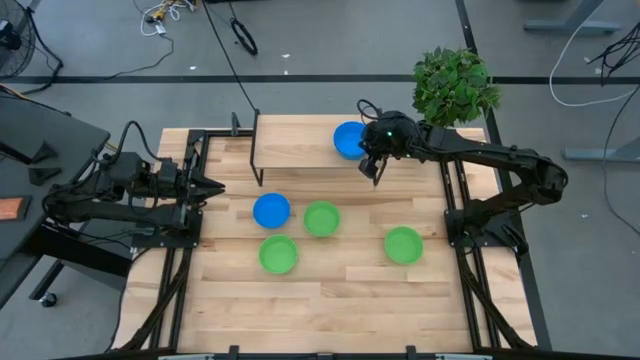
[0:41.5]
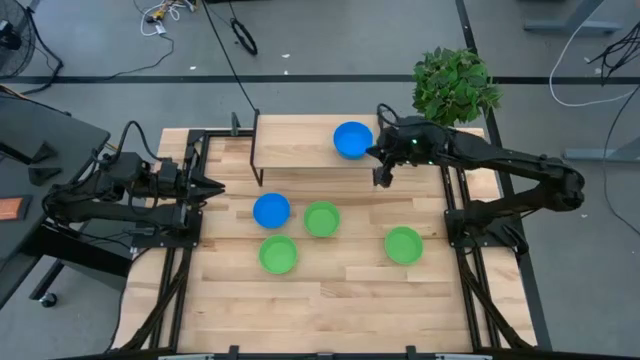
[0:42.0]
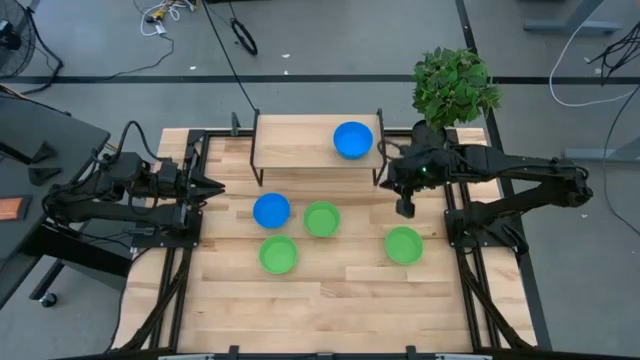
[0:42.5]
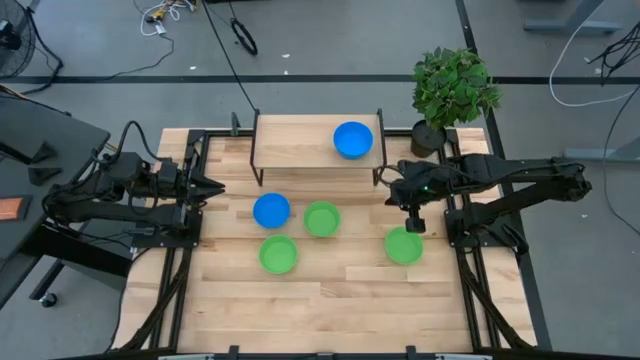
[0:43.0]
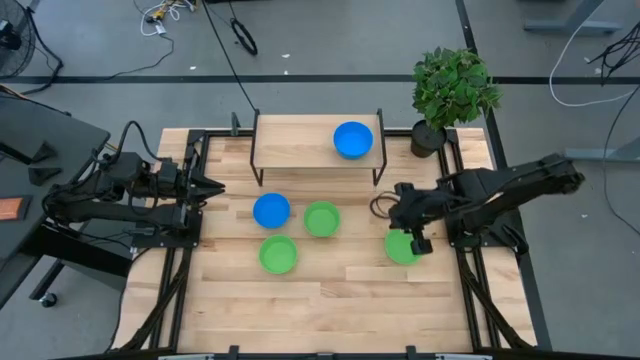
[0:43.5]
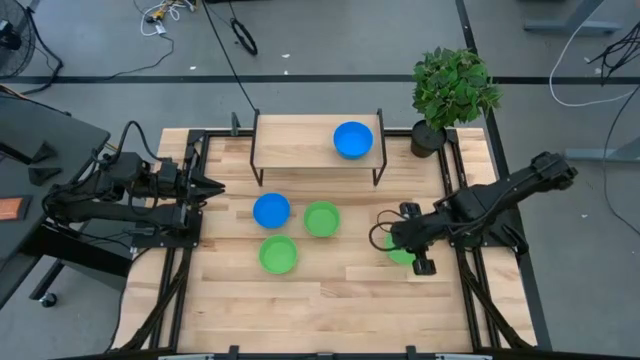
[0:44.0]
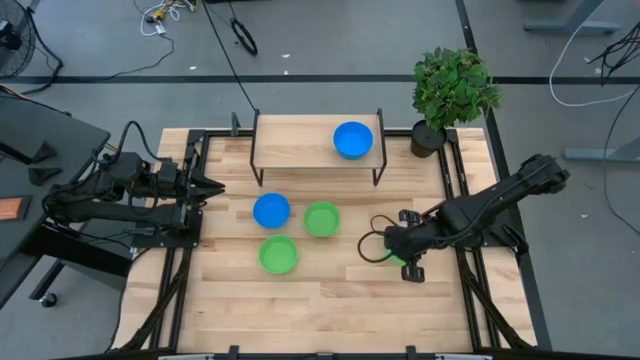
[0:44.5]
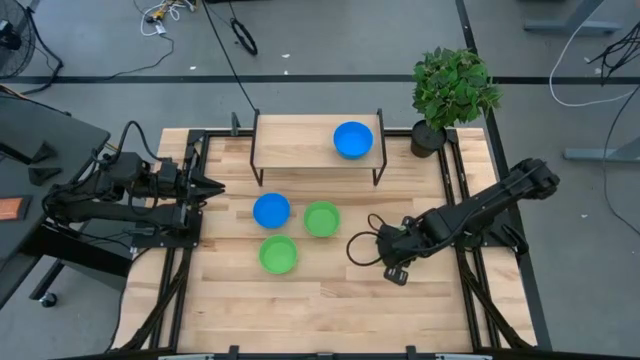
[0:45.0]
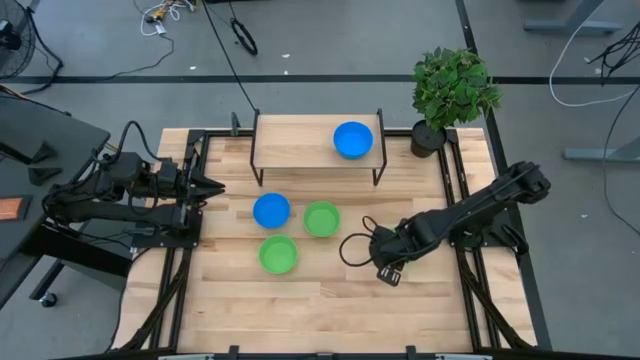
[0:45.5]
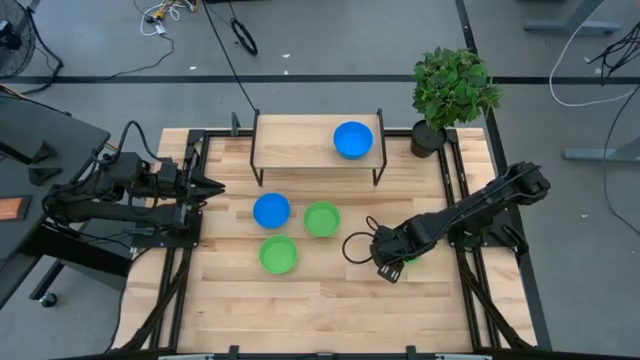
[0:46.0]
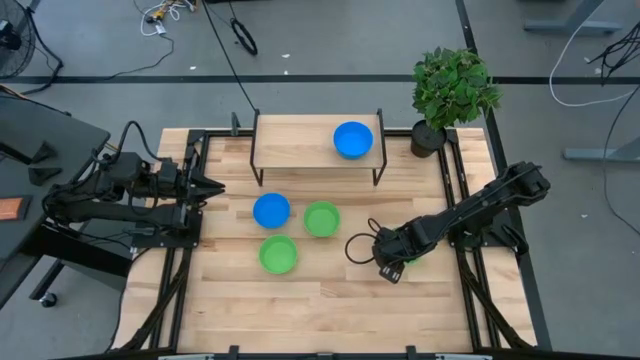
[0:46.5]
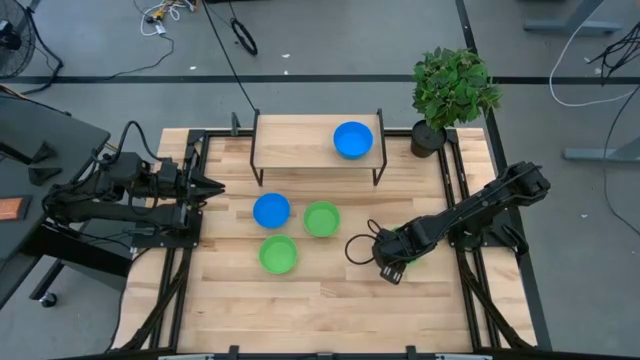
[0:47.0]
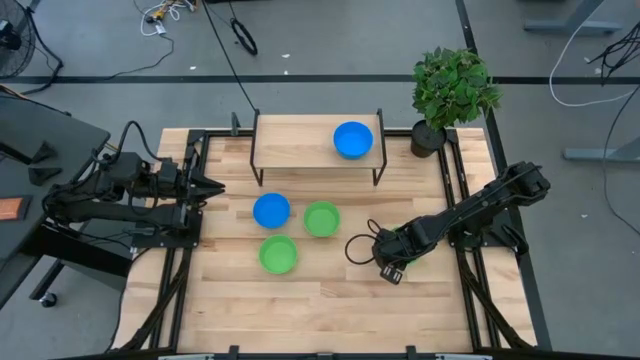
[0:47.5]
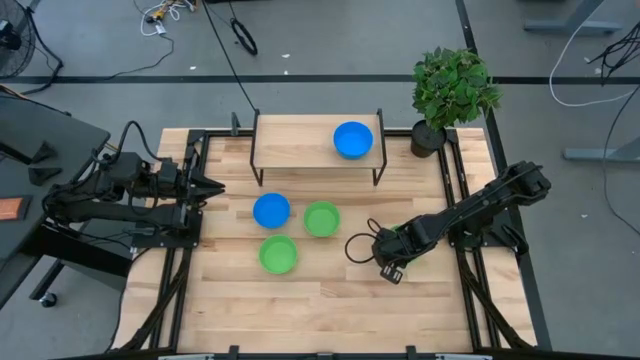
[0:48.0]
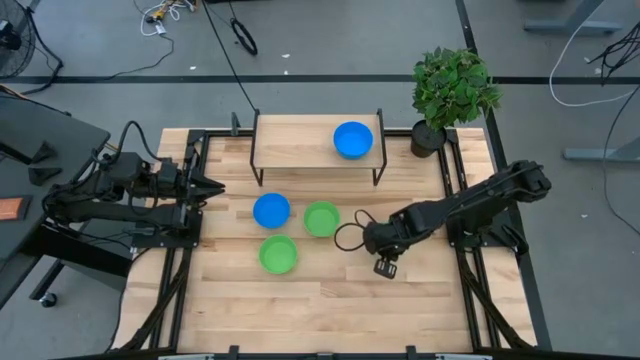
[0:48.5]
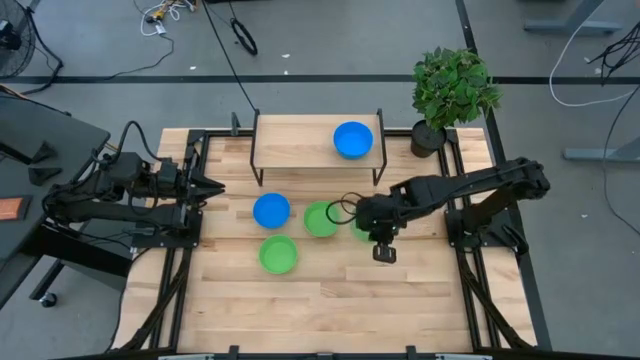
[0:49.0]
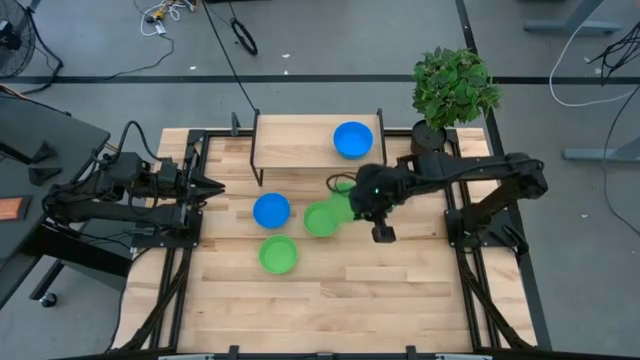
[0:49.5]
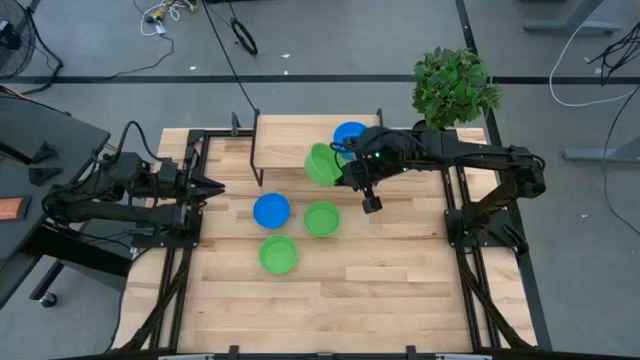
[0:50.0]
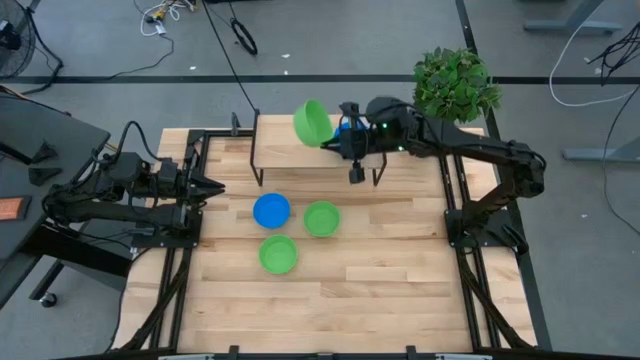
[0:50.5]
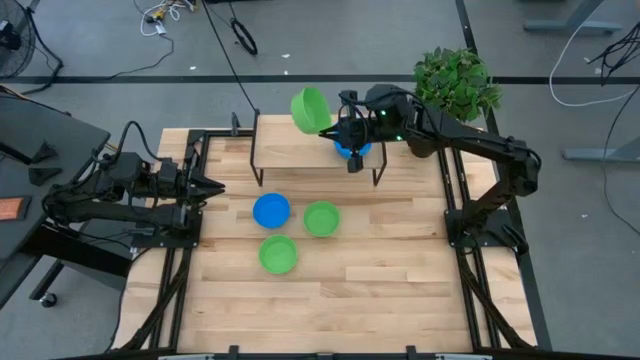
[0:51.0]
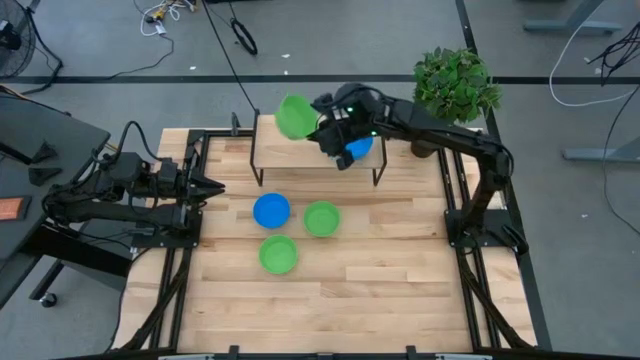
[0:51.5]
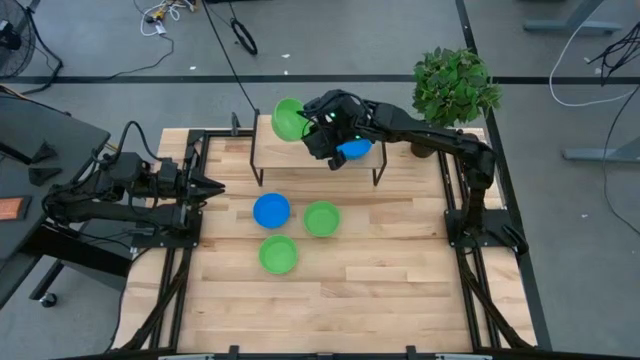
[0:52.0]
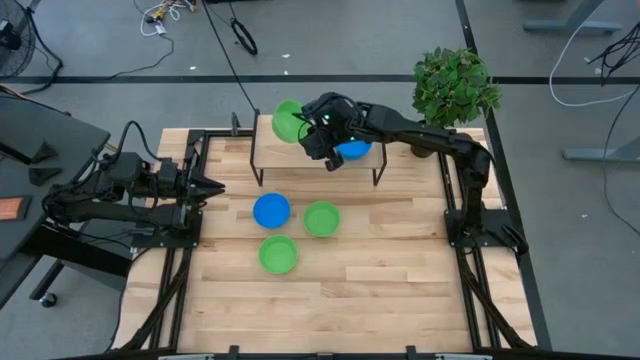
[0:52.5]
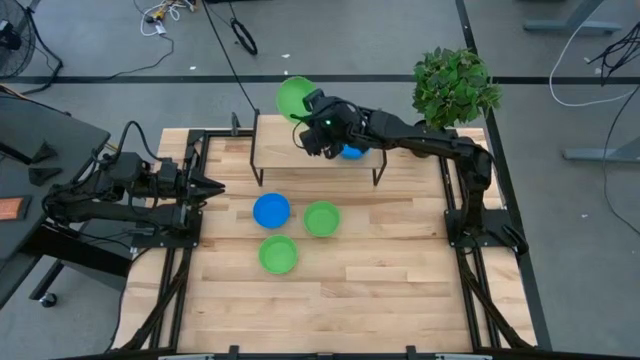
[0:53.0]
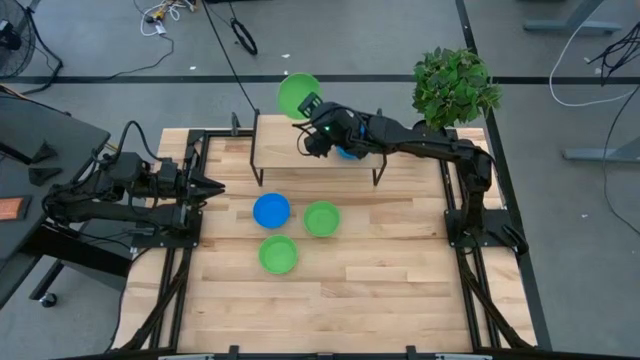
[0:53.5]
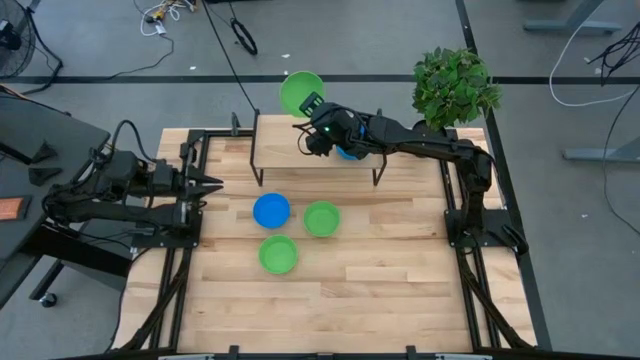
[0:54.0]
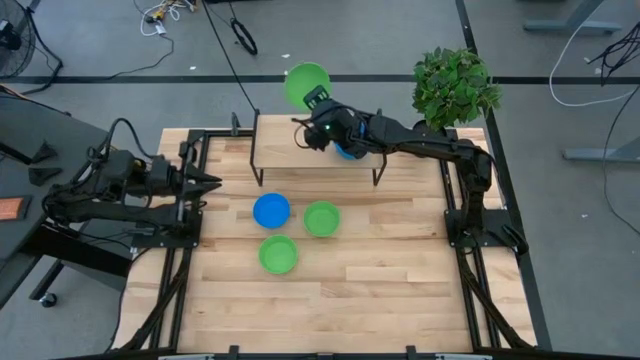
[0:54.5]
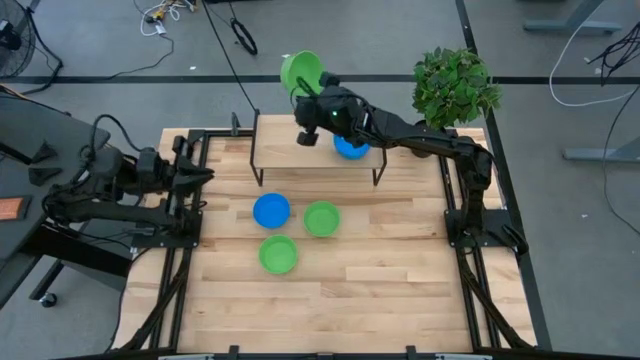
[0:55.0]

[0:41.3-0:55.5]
Task: Pick & Place Mini bowls
Put the right green bowl on the shelf

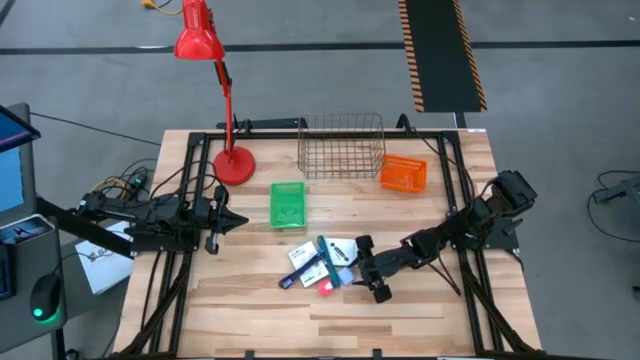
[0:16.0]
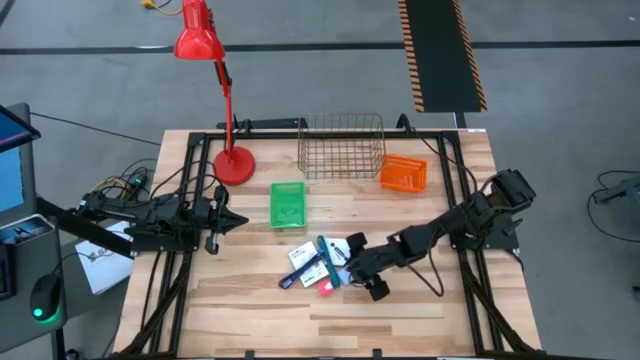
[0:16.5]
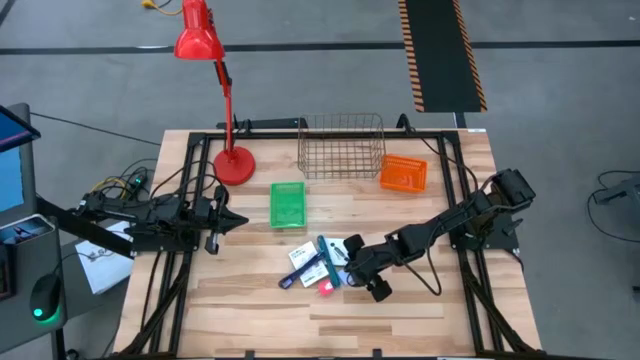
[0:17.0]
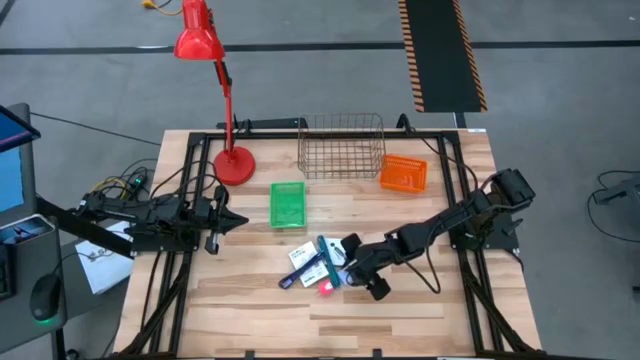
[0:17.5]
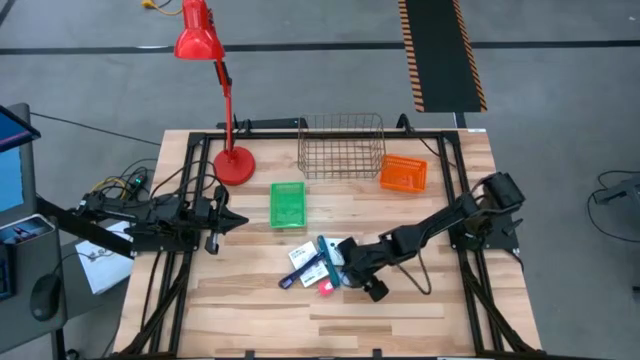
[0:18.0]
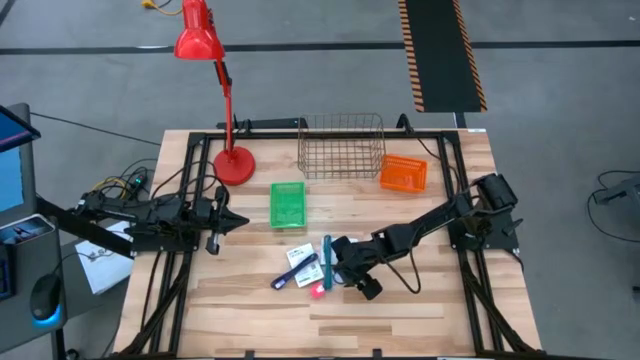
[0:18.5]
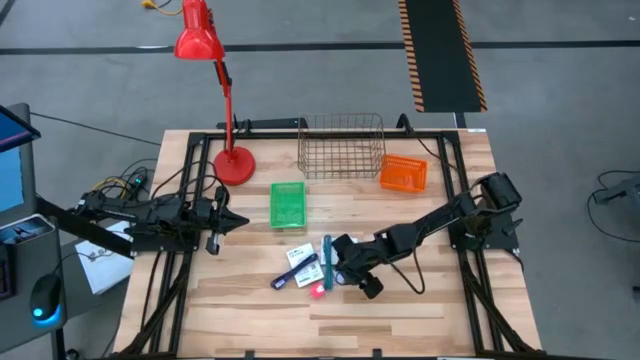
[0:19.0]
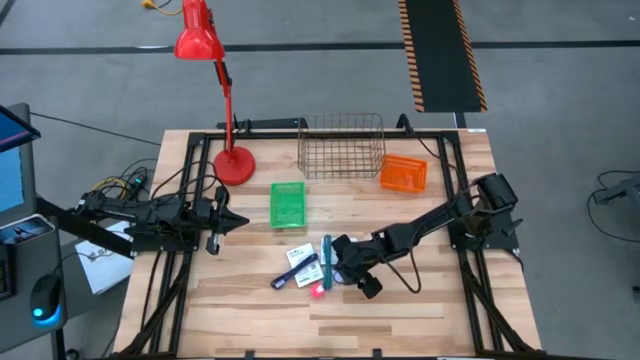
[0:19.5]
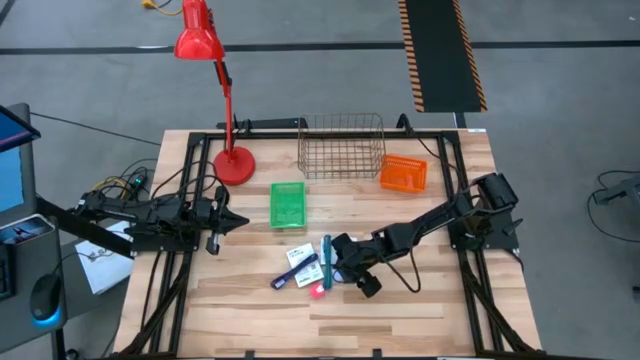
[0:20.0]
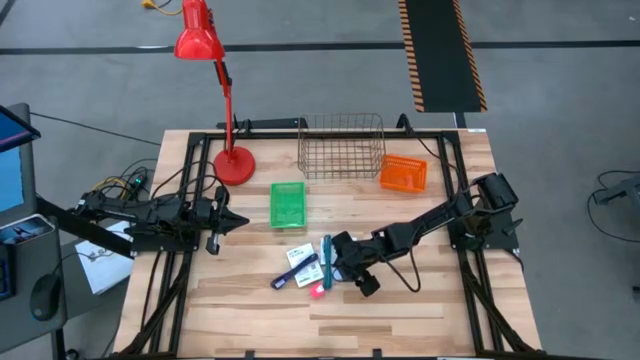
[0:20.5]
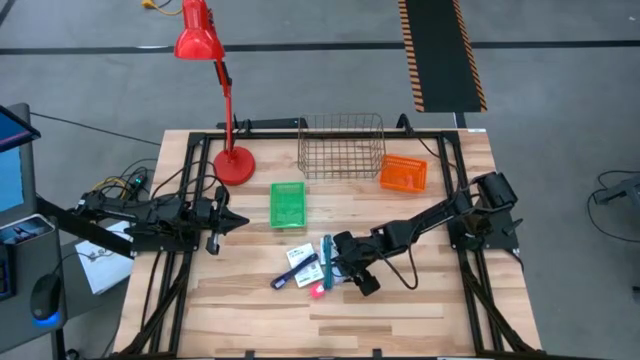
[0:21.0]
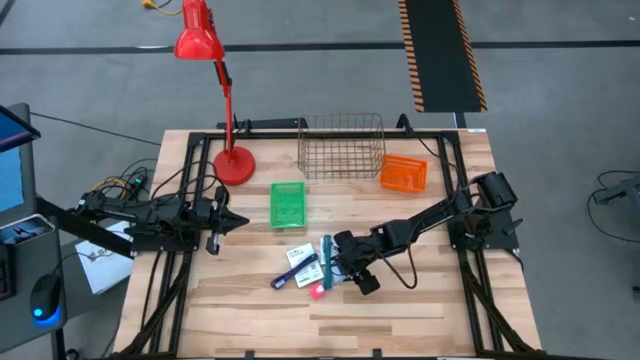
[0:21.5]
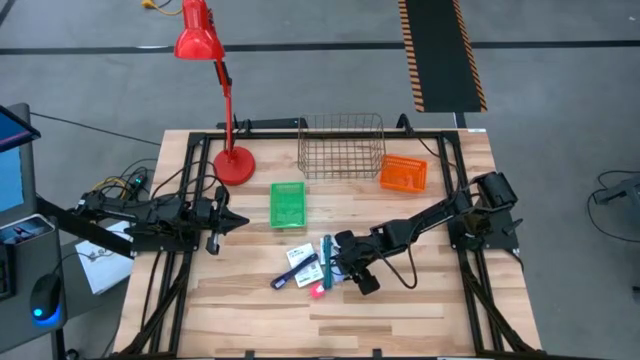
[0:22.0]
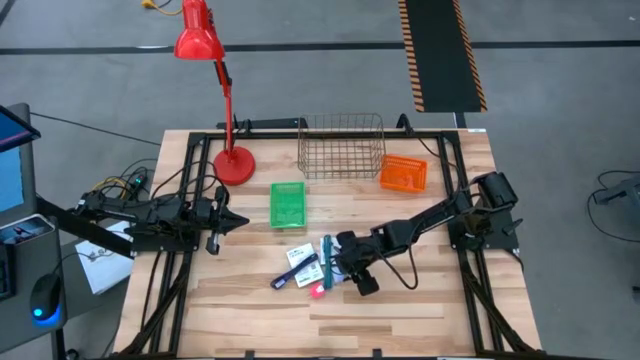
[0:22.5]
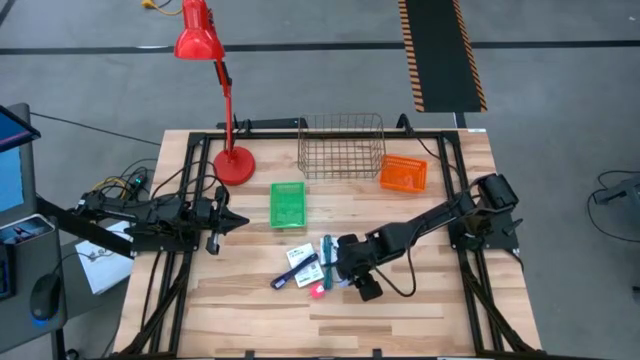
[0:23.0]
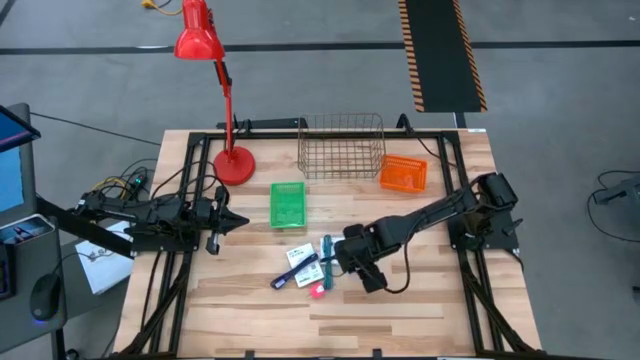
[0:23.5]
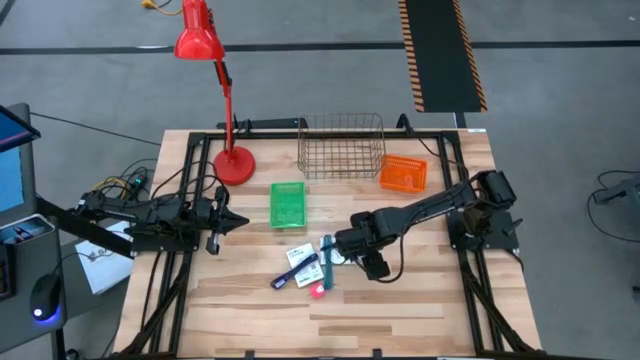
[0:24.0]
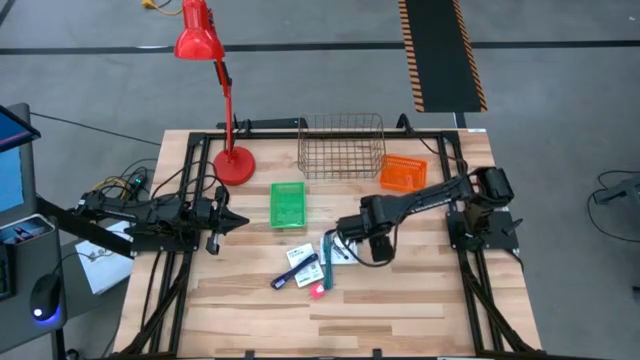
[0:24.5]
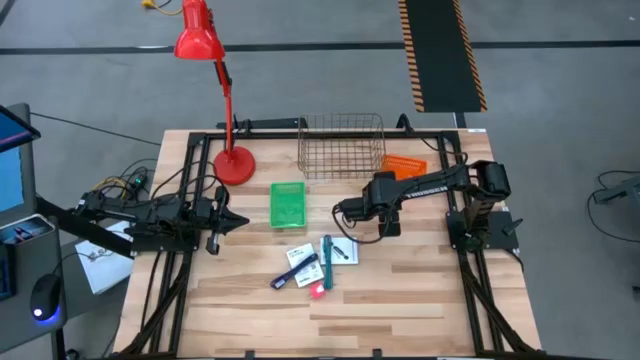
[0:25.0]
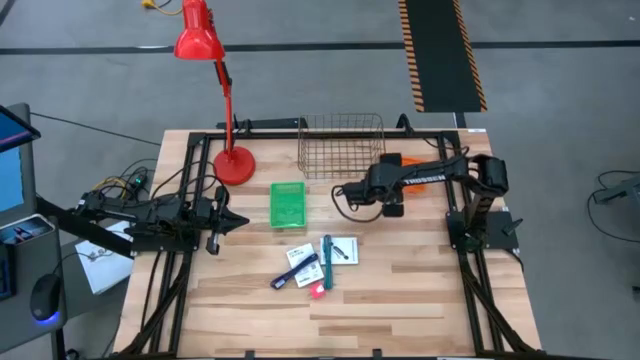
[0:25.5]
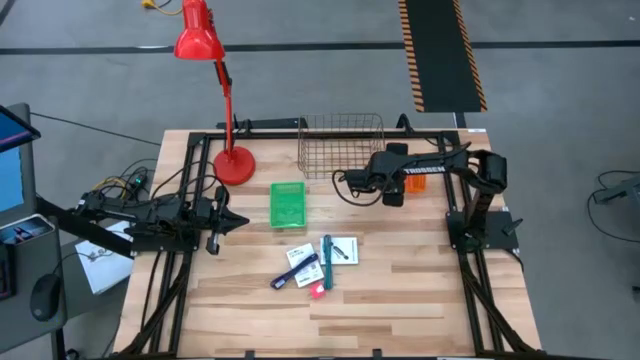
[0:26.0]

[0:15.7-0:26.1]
Task: Pick and place items into bin
Put the white charger adapter into the orange basket
